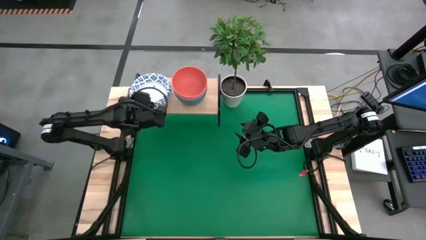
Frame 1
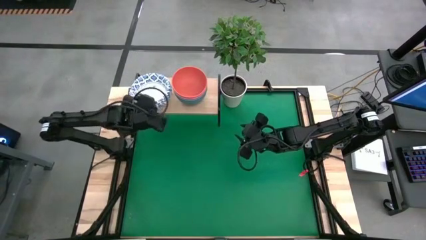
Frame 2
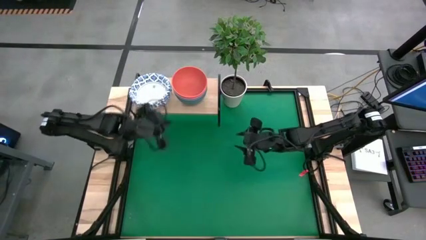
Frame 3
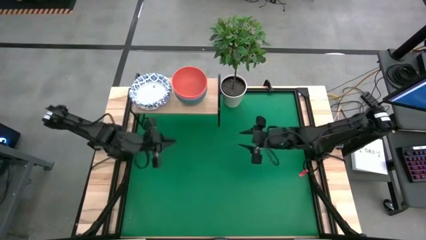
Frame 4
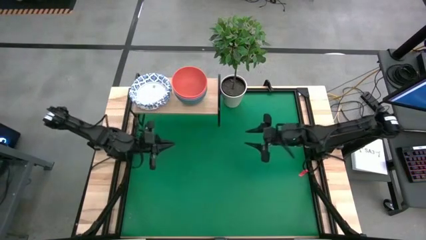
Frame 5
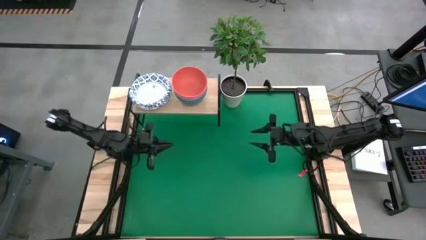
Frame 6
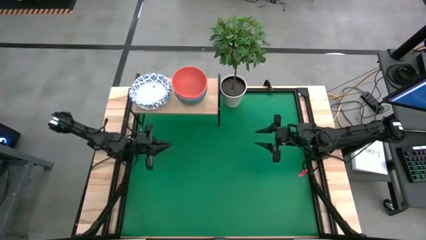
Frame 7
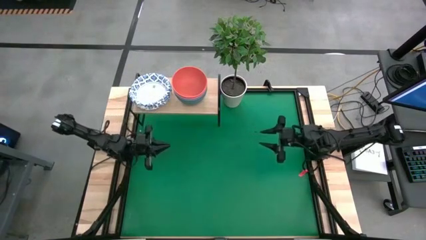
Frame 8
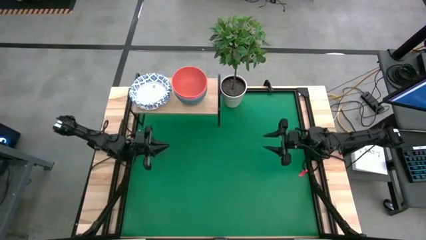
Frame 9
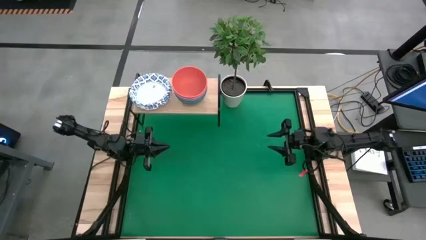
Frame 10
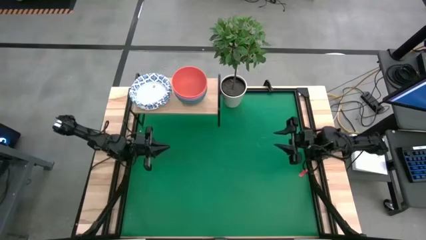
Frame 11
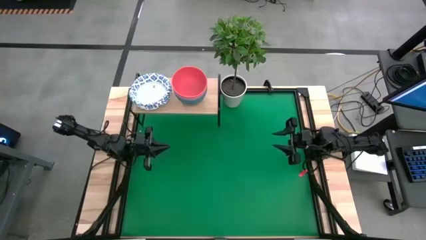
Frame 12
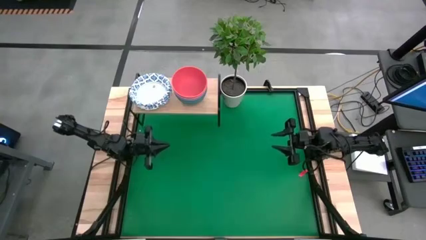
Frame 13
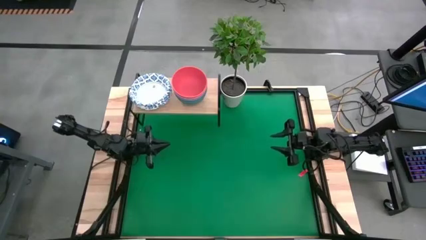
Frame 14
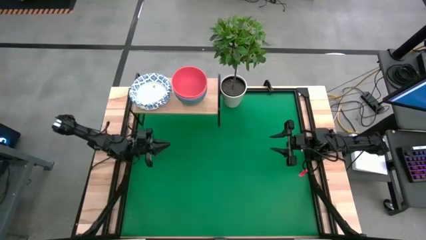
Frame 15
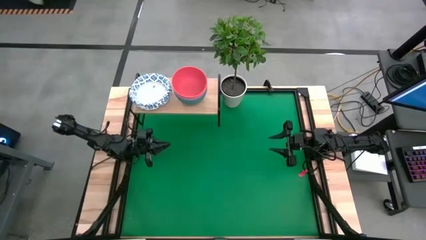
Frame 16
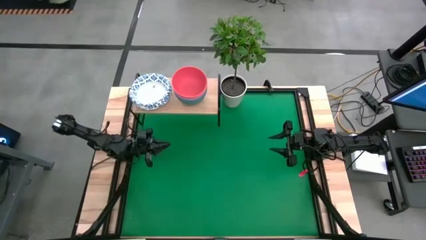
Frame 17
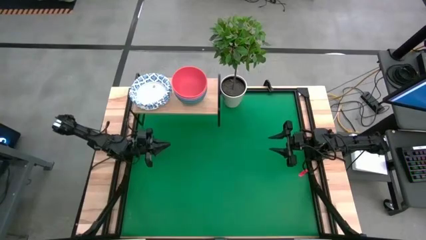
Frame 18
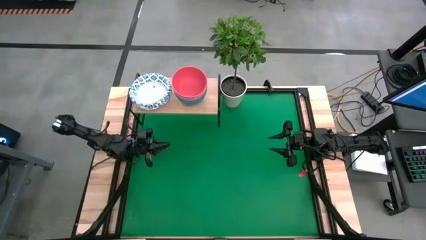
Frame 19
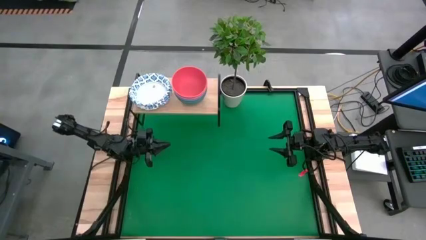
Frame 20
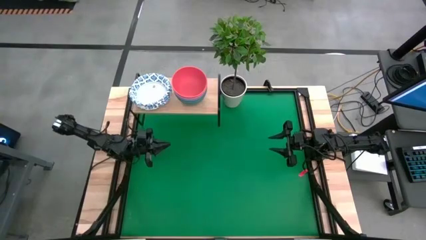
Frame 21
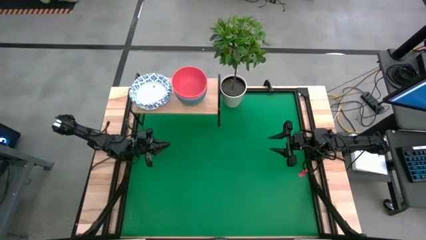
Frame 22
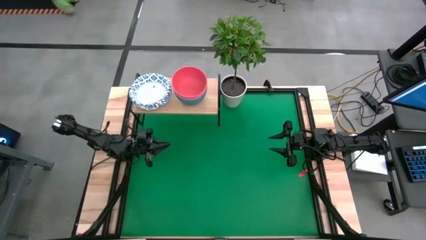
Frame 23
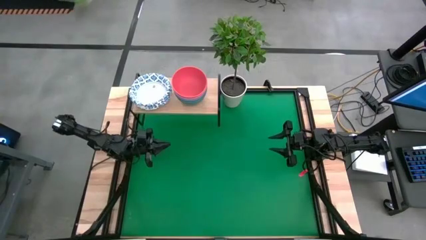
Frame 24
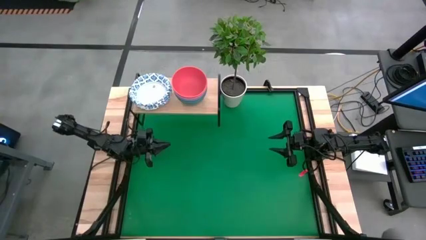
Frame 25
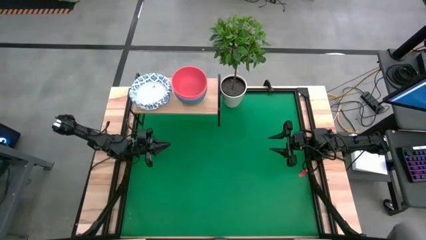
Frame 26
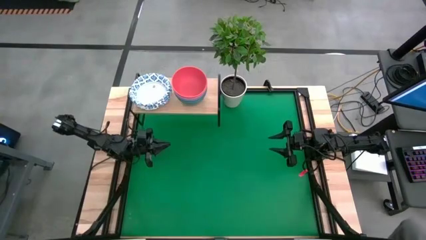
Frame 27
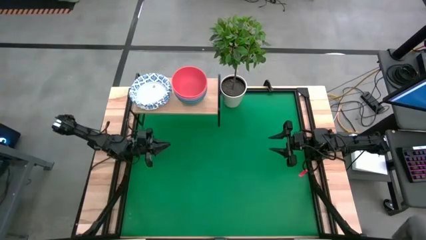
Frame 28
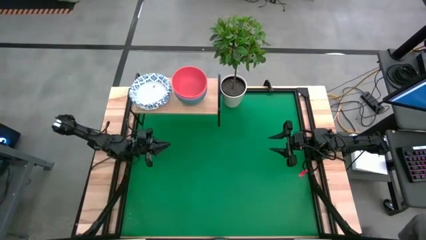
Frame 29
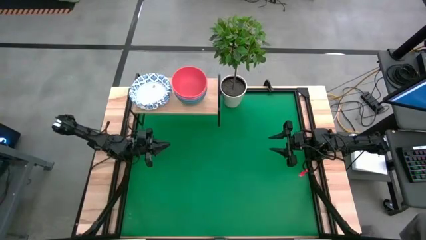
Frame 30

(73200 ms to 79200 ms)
Task: Place and stack bowls onto a shelf
Return to Home Position

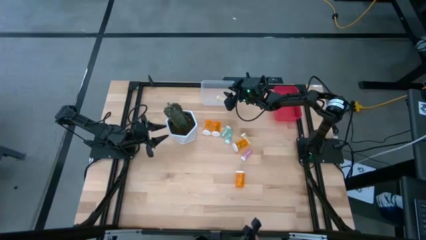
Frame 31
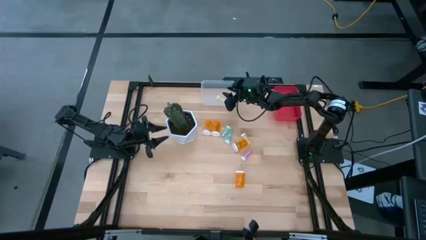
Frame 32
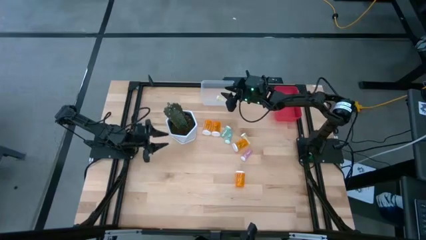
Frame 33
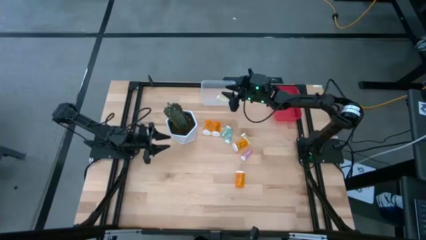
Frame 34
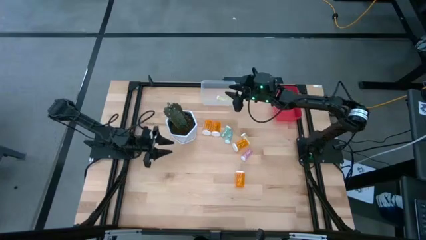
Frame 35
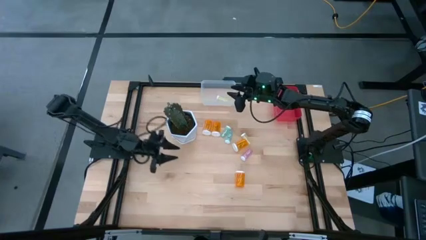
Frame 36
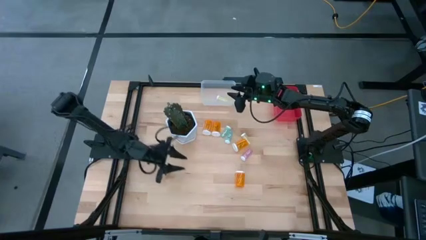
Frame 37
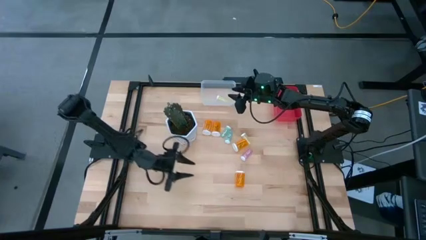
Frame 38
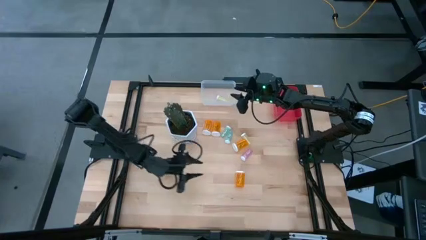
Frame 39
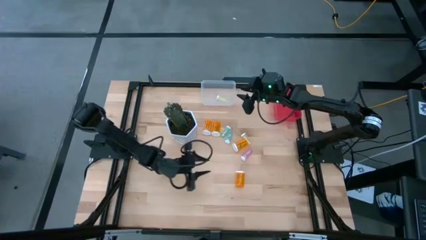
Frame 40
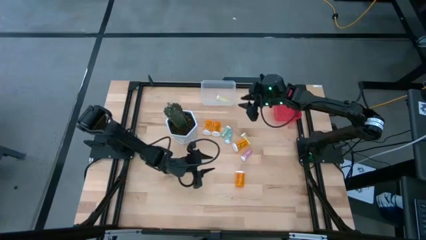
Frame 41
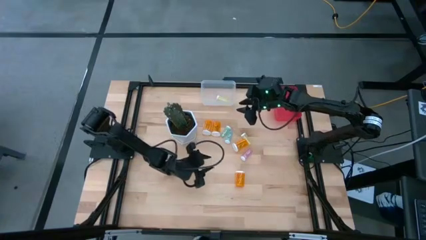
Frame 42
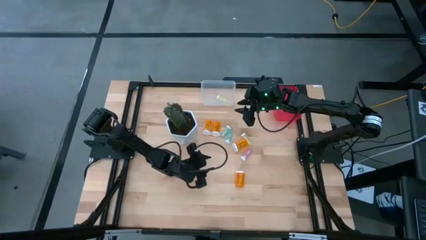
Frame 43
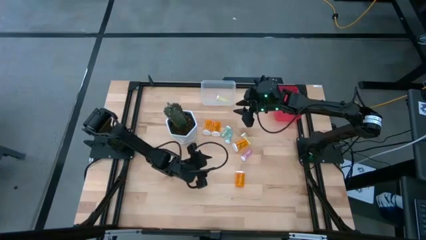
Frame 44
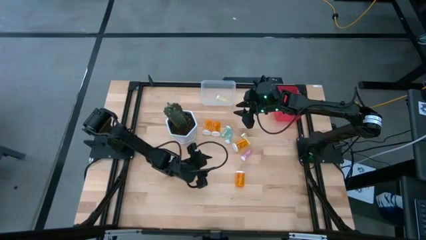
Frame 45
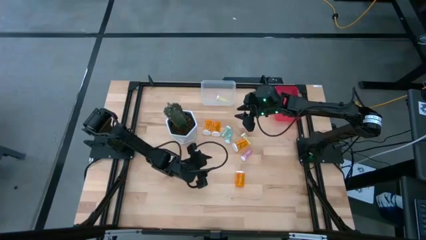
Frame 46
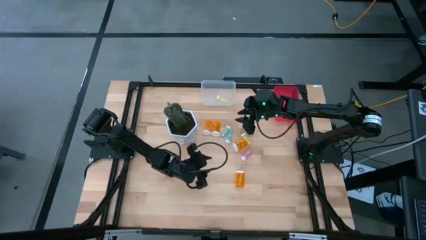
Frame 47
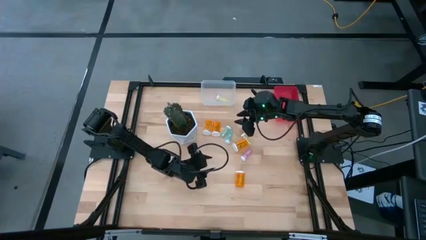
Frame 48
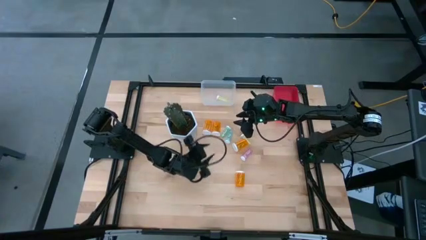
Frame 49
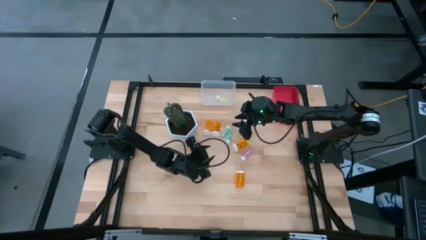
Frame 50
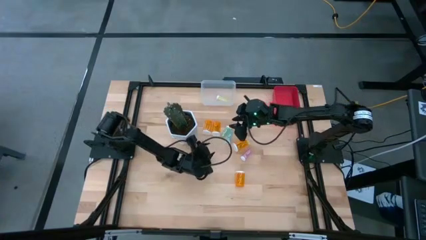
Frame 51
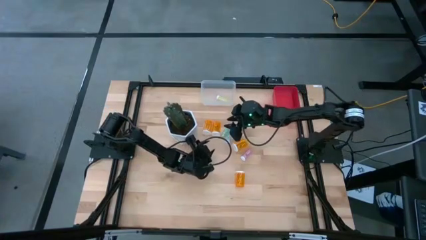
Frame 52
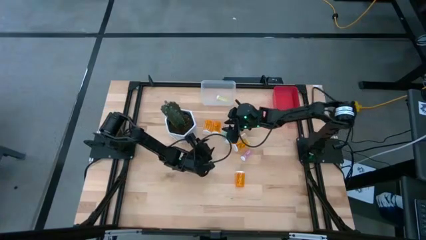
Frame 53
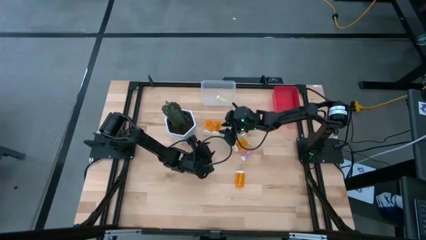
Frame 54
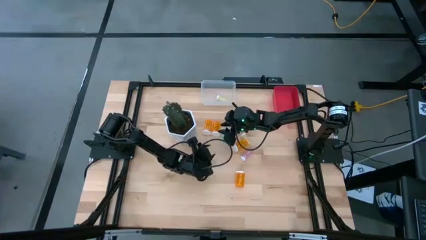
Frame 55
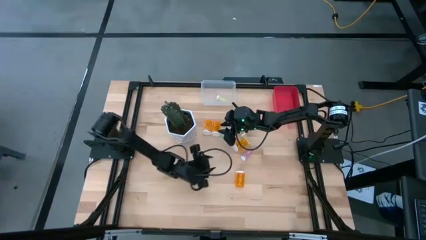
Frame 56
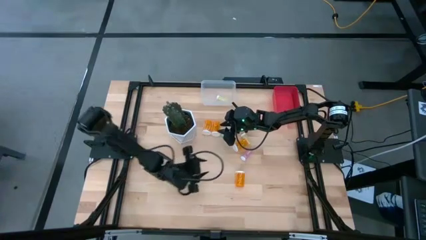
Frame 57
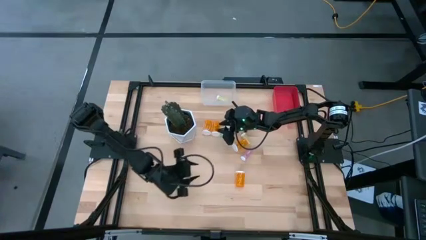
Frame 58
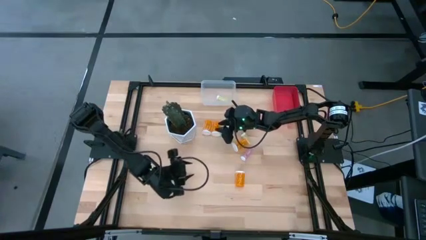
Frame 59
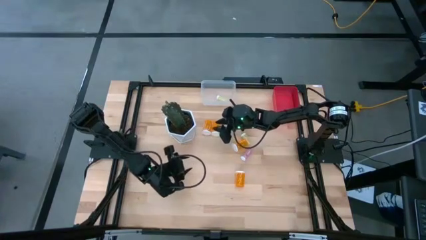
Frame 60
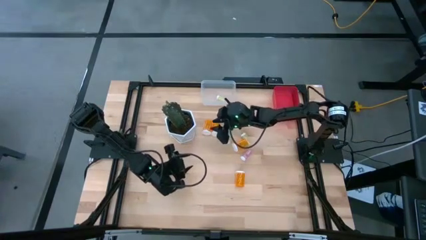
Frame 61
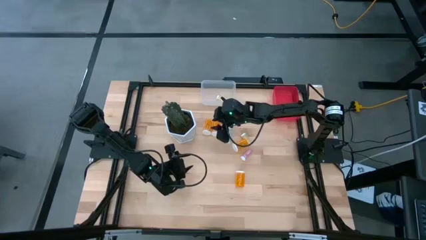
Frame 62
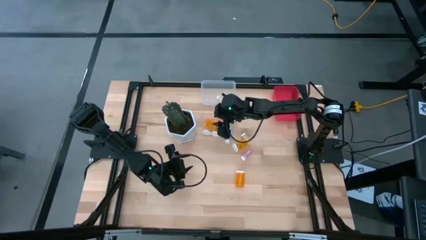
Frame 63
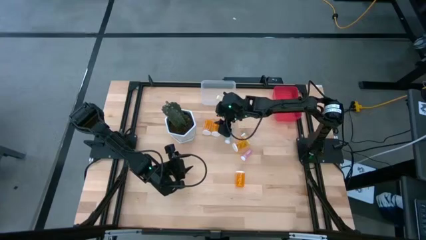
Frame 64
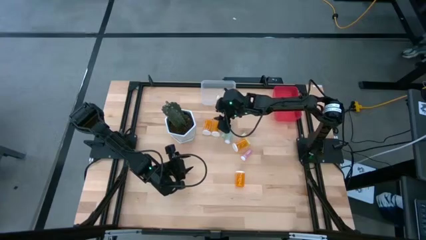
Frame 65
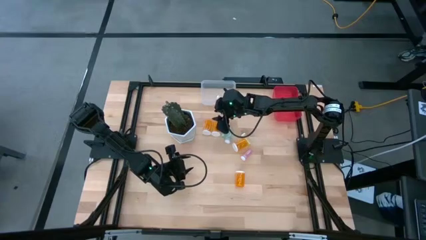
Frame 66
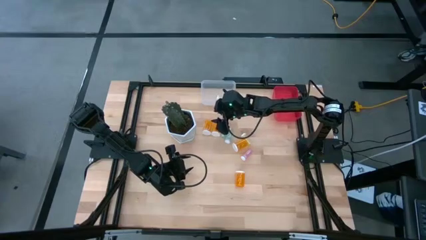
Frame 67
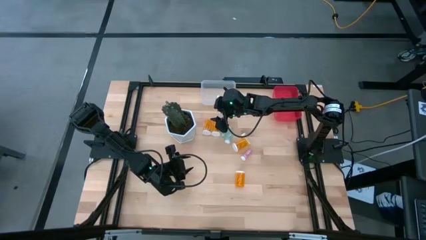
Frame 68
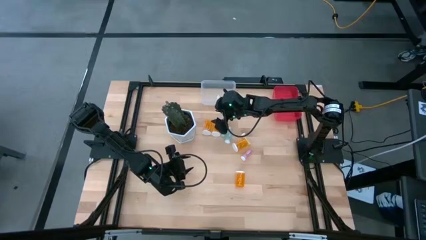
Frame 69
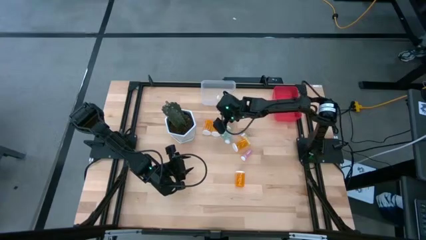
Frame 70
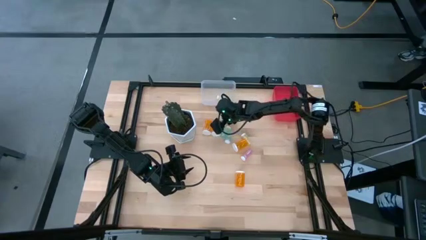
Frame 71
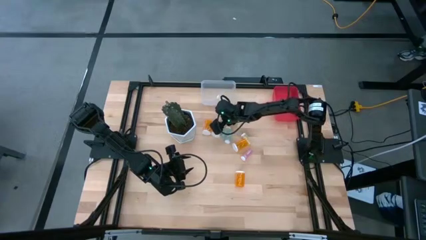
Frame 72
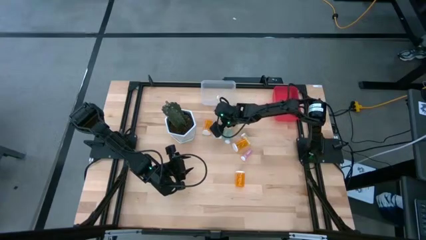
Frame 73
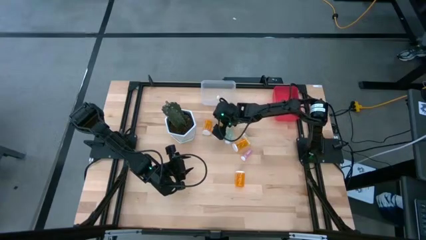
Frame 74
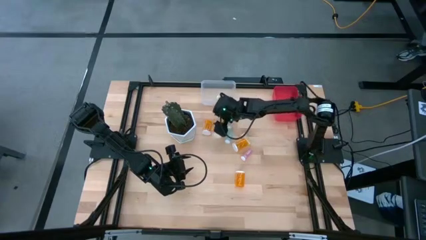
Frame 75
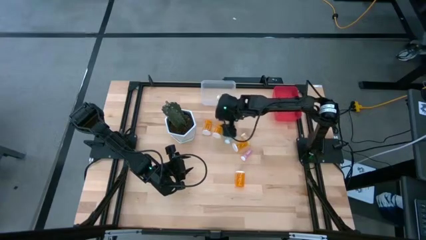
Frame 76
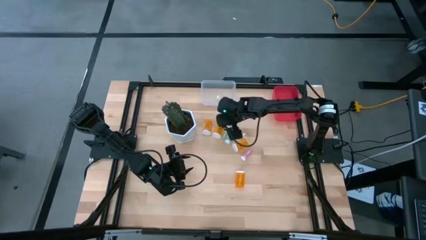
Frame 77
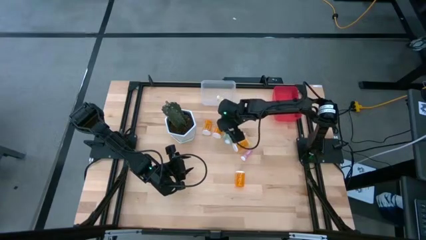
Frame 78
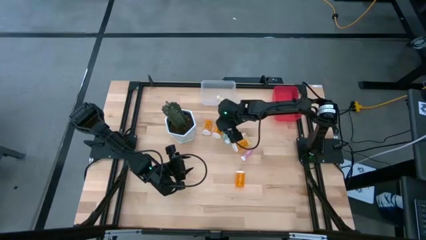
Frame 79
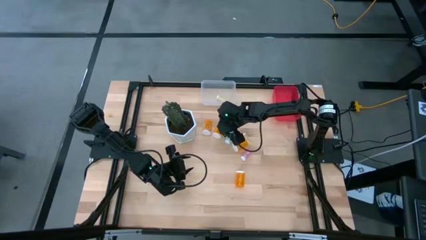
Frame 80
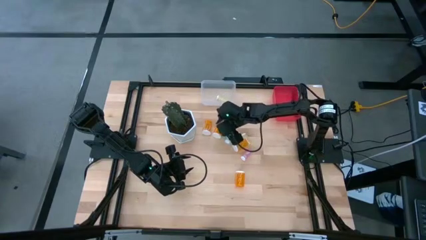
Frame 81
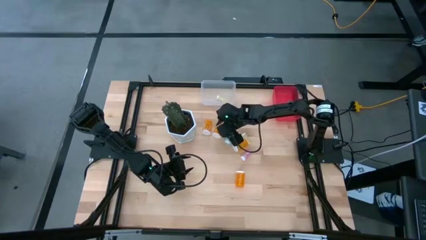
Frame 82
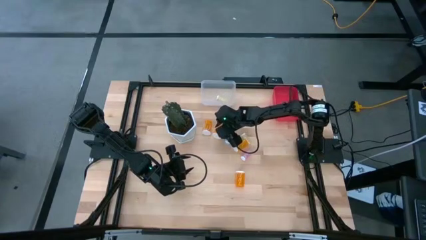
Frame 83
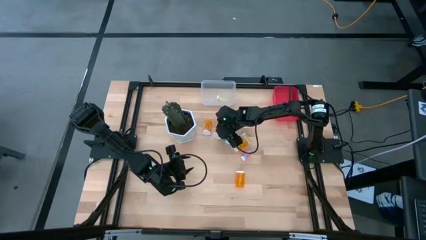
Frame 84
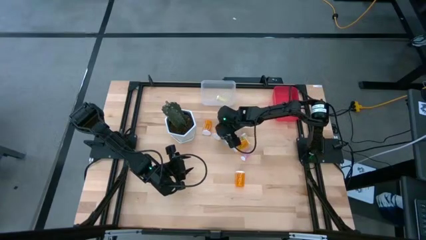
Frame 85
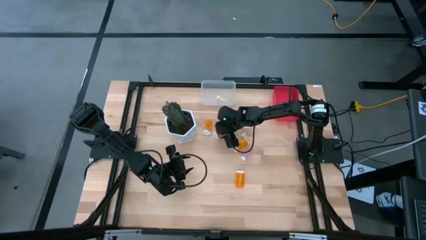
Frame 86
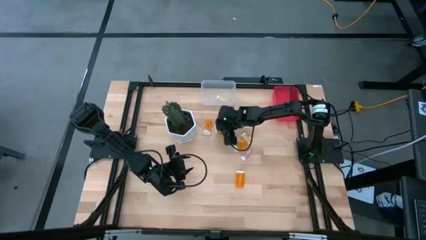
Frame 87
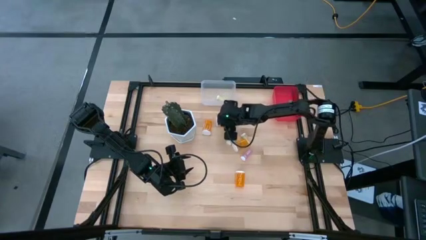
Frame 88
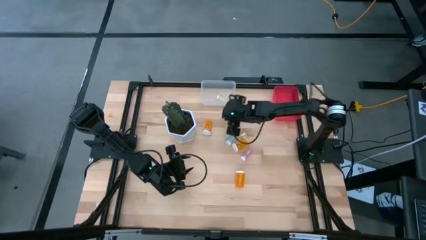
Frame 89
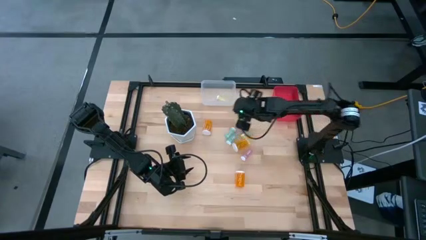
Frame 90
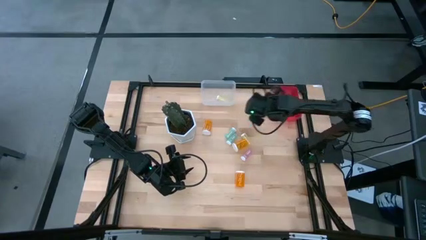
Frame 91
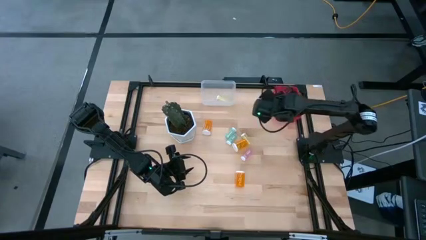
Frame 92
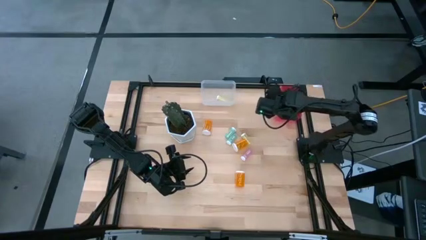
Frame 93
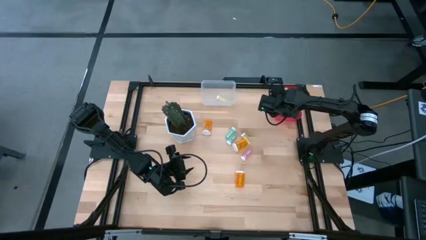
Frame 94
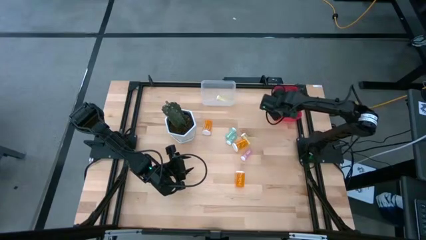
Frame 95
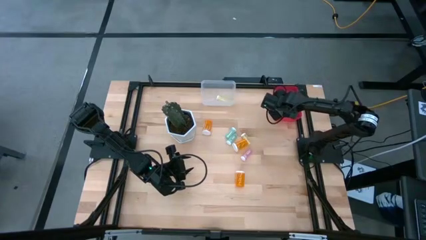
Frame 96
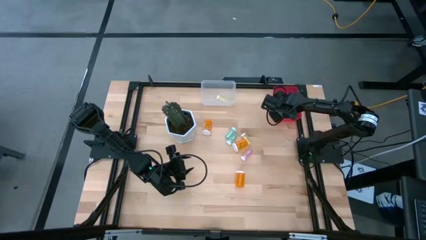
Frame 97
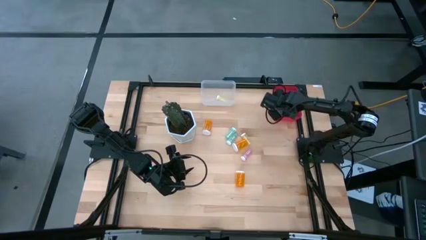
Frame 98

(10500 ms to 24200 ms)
Task: Pick and place medicine bottles into bin by pill shape (circle, oval)
Put the large orange pill bottle into the red bin
